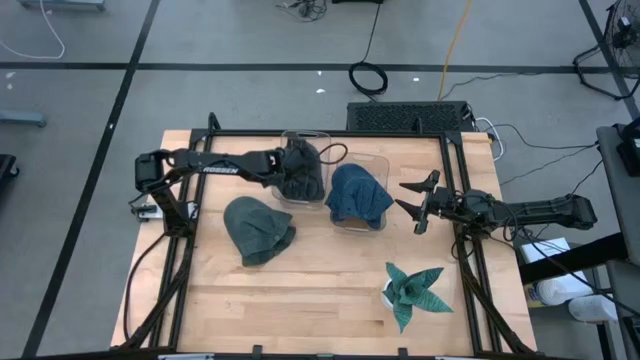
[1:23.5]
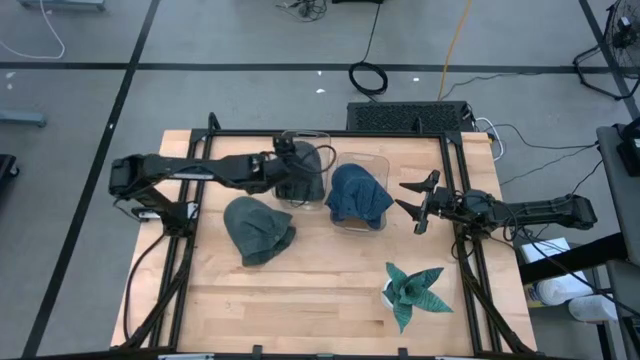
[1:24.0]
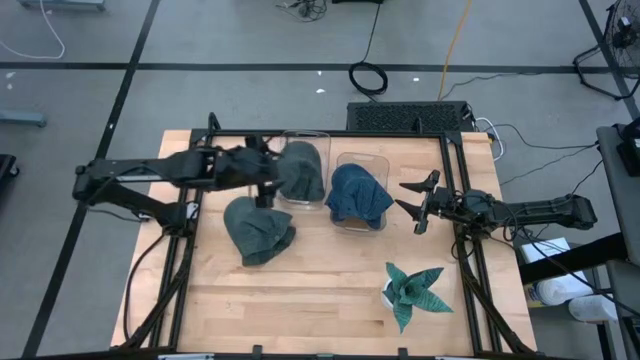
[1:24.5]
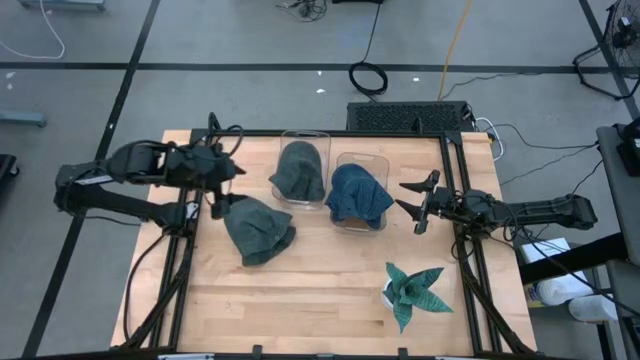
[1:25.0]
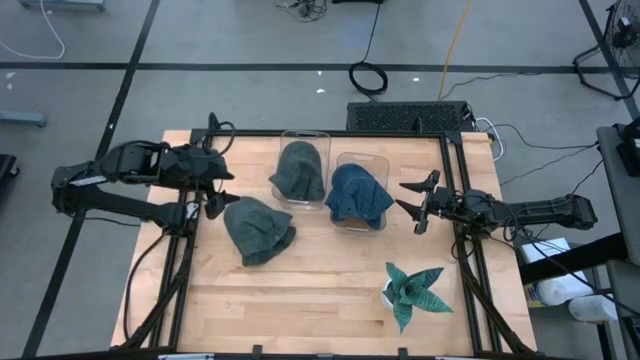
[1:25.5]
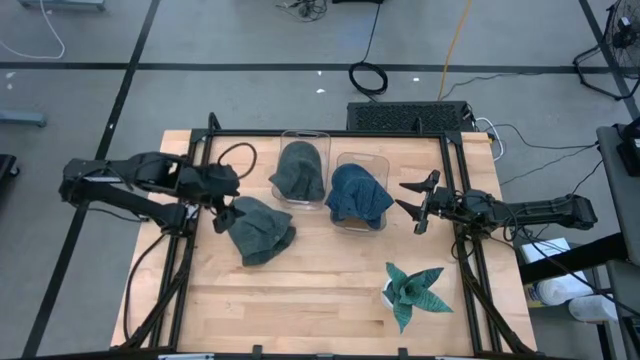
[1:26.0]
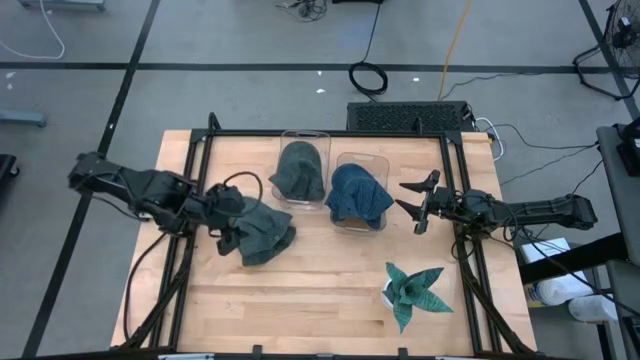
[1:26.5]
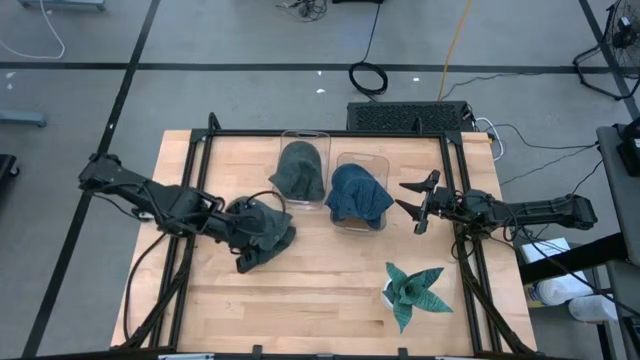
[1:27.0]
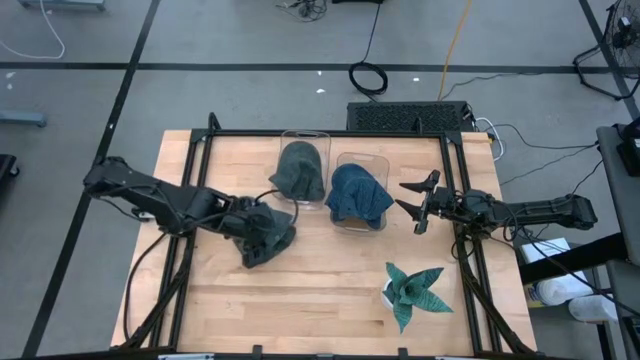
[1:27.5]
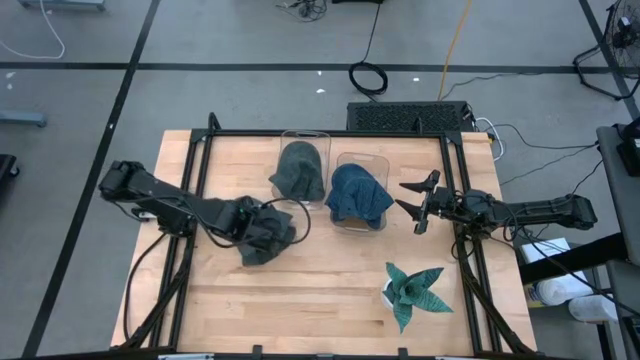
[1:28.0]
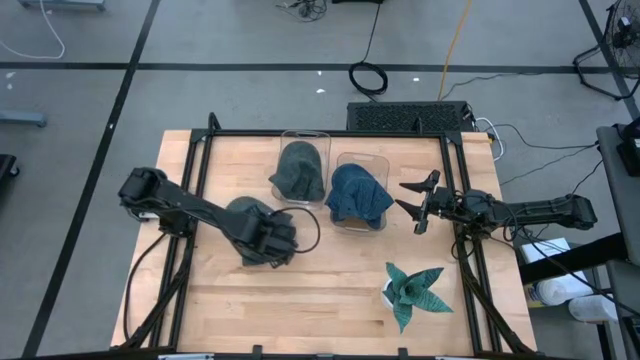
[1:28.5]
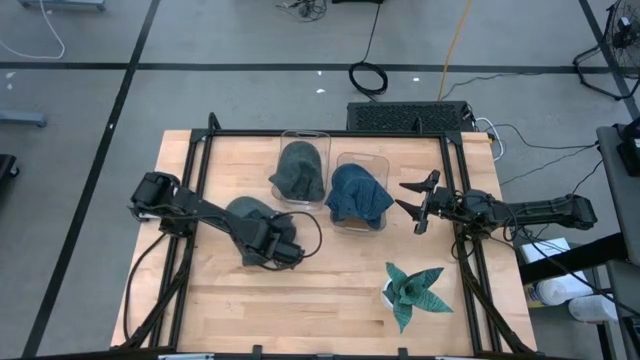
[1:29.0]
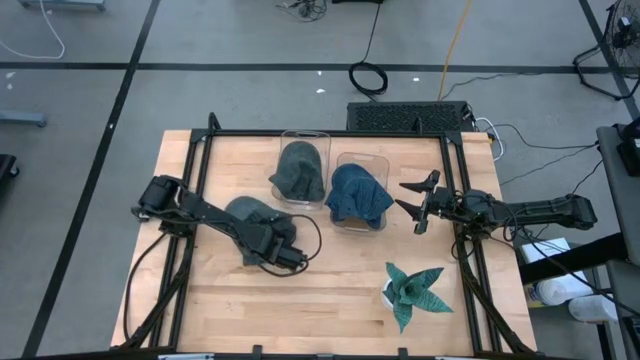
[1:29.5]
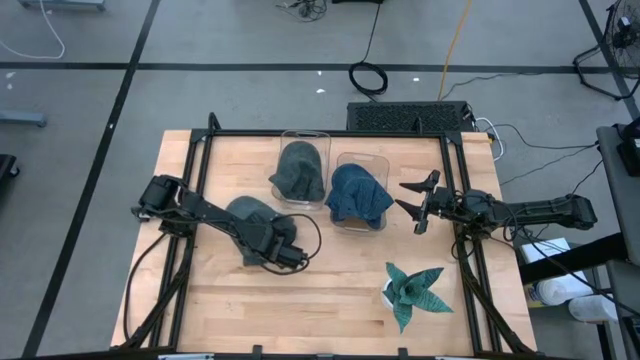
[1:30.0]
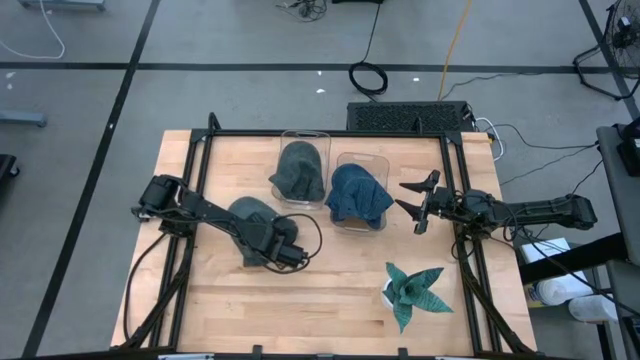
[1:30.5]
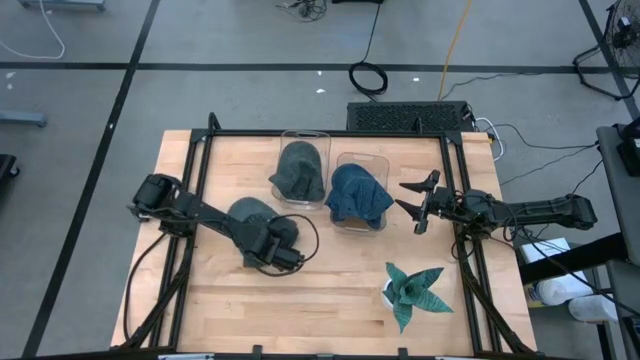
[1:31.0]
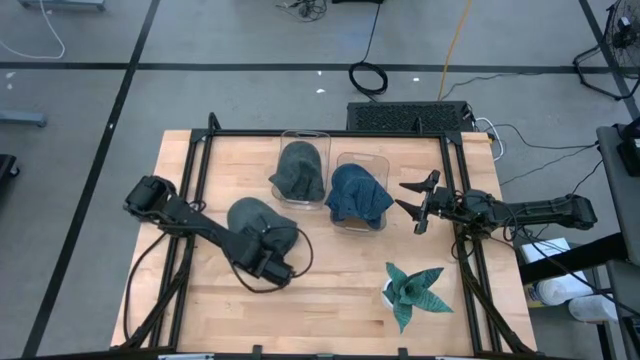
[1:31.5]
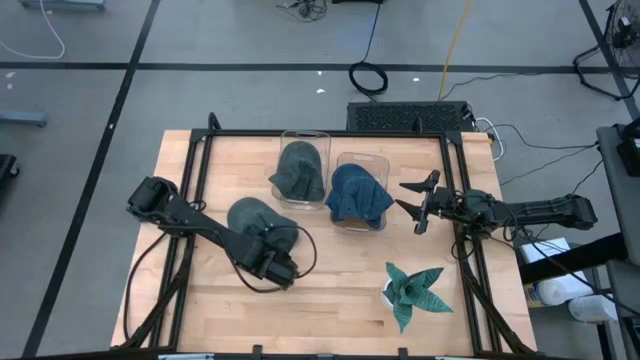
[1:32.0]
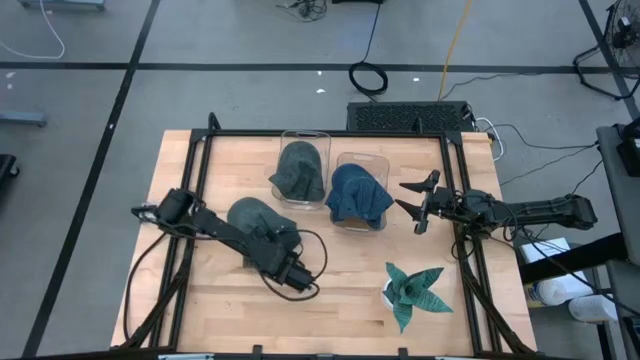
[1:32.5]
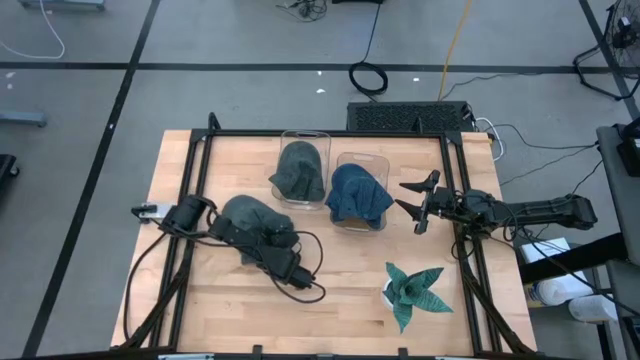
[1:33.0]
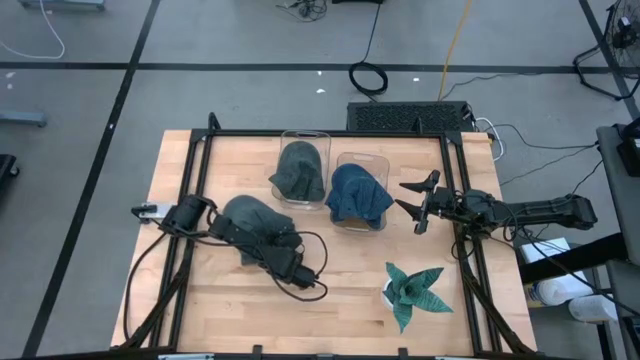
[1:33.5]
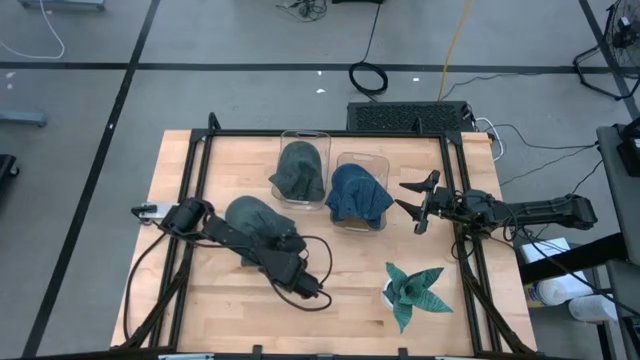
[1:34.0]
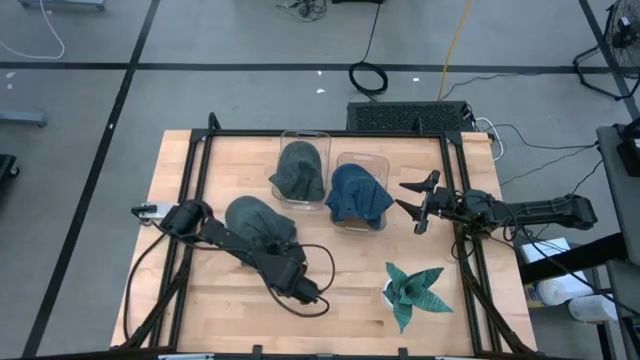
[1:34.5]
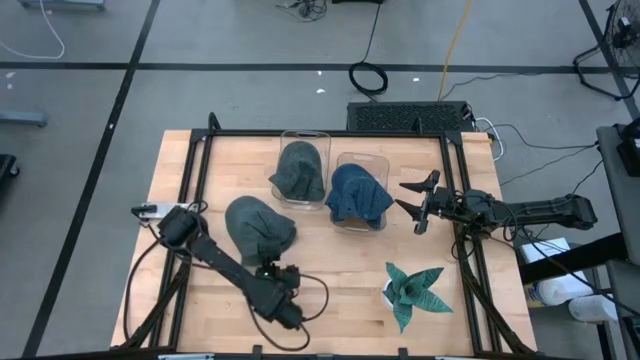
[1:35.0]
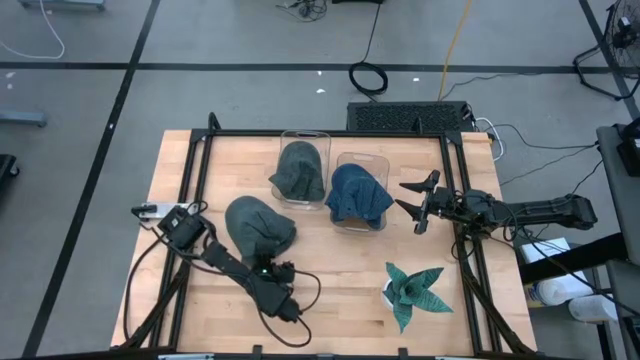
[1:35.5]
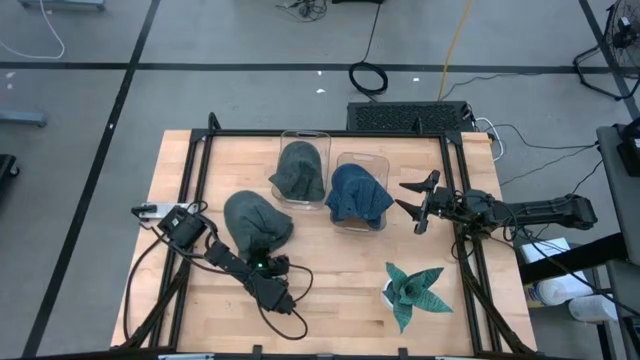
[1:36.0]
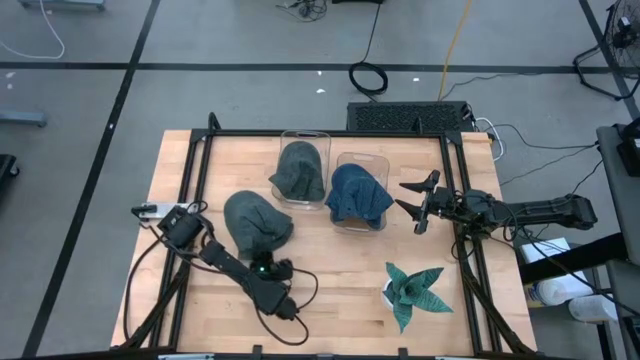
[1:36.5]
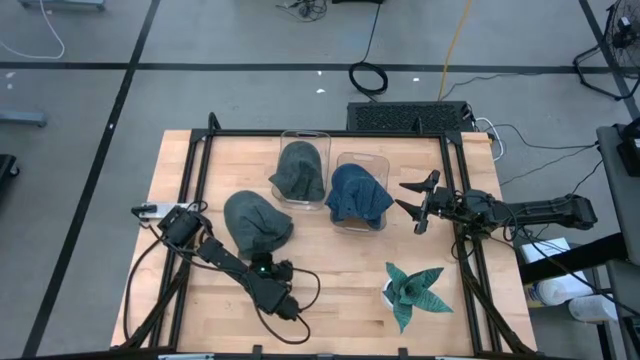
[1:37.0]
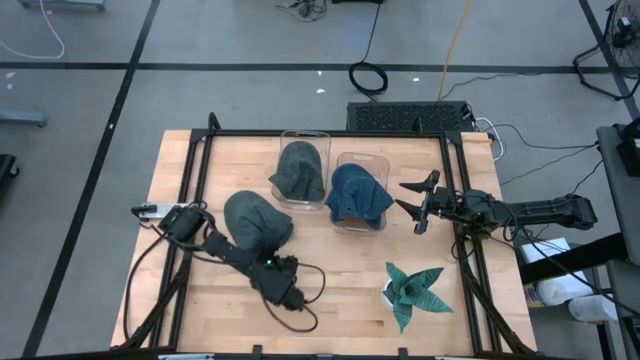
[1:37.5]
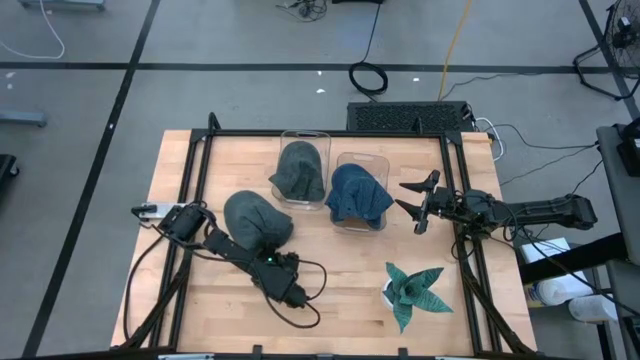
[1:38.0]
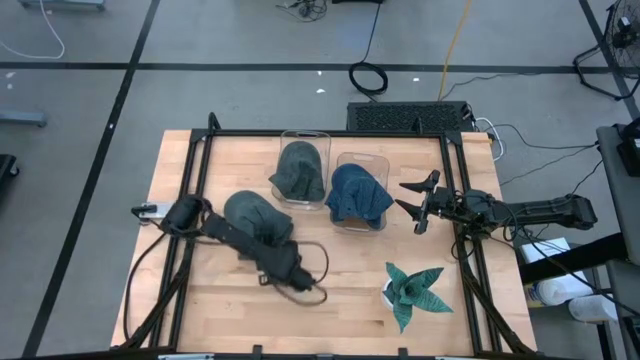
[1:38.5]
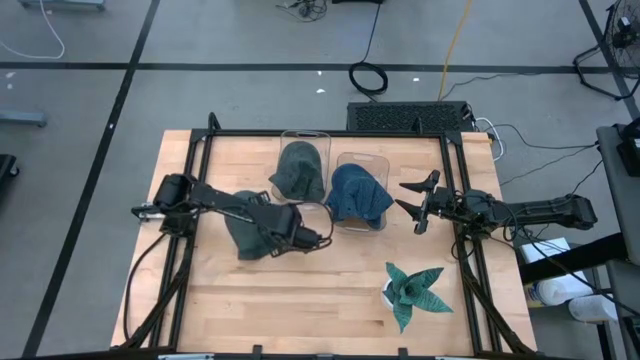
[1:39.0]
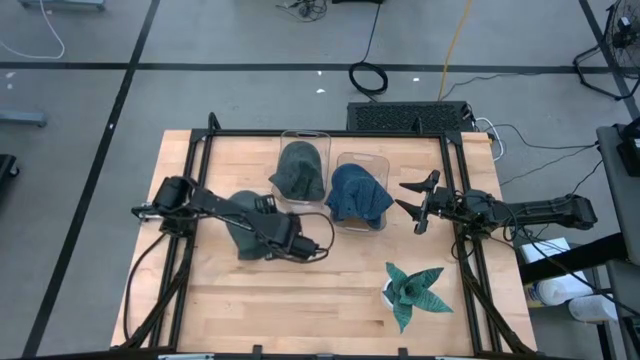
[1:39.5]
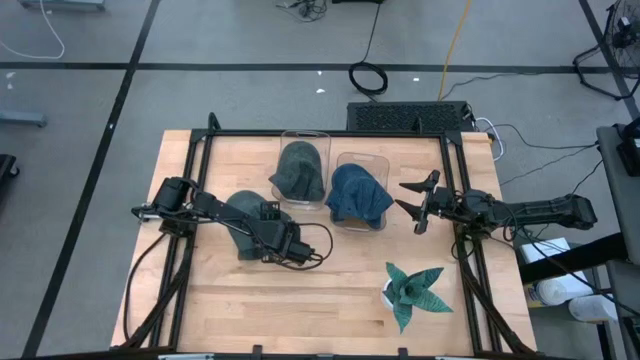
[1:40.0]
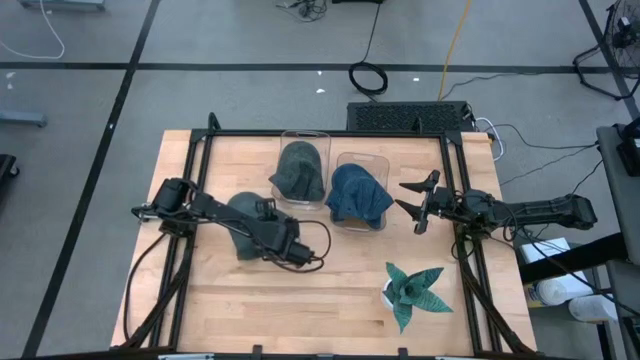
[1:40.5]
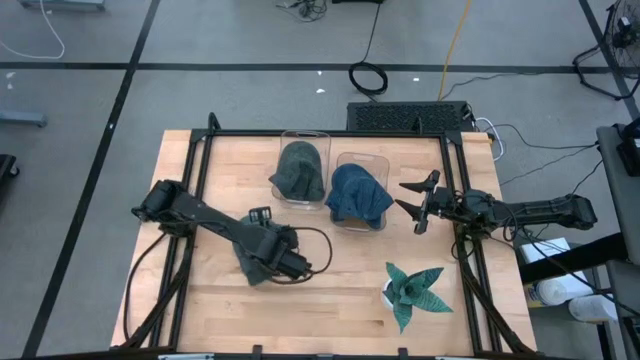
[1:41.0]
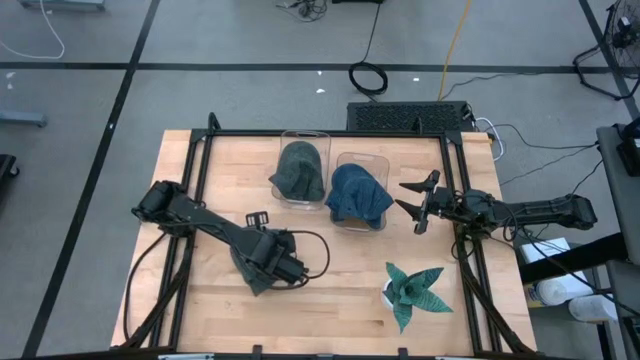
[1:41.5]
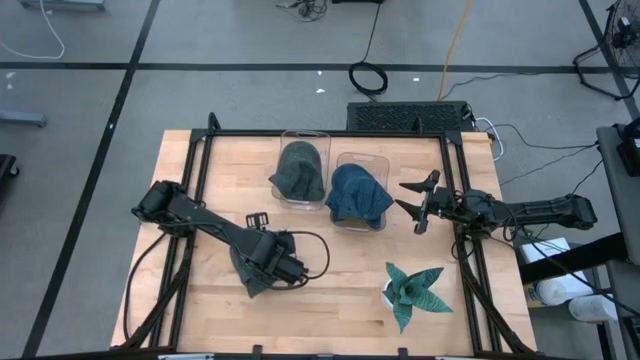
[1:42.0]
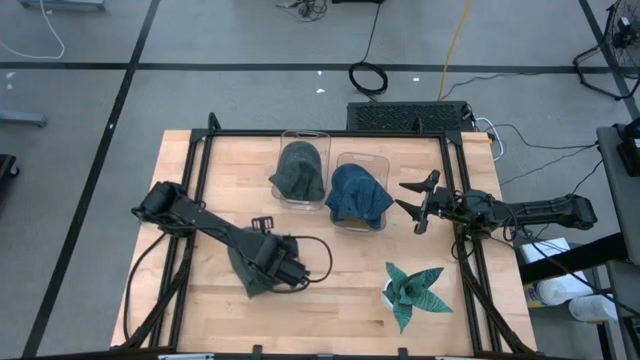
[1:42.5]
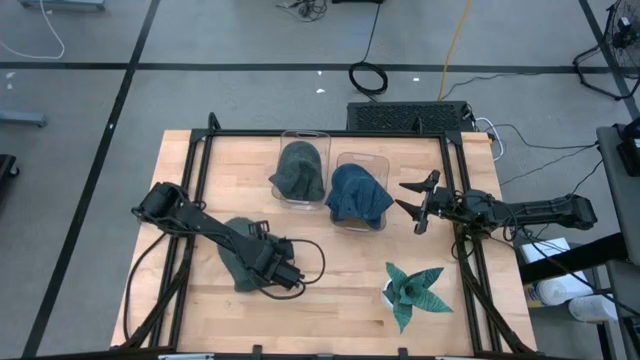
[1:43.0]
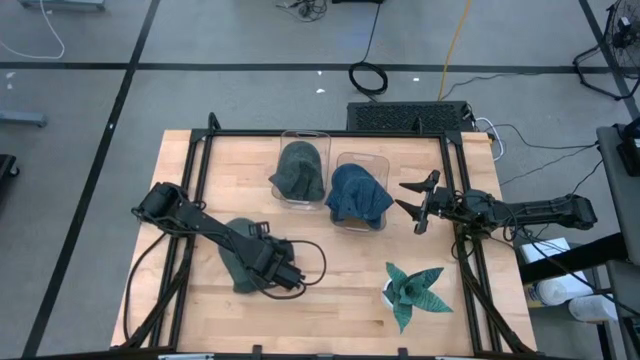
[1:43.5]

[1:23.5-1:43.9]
Task: Pick & Place hat
Put the top black cap into the left transparent bin
